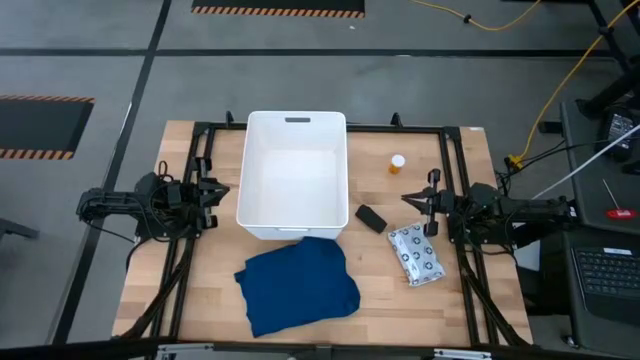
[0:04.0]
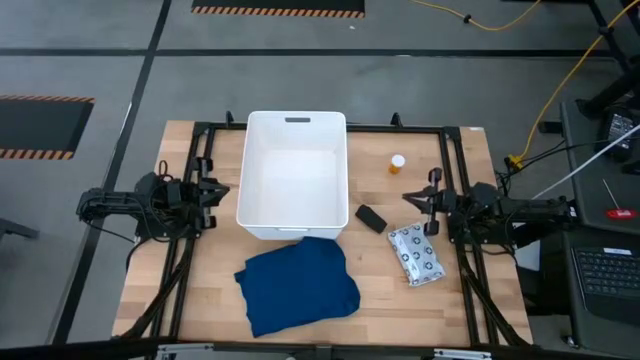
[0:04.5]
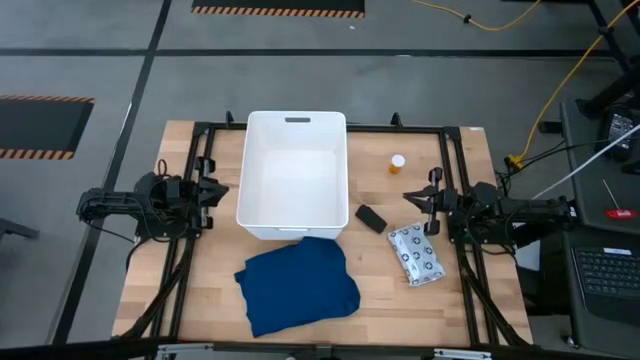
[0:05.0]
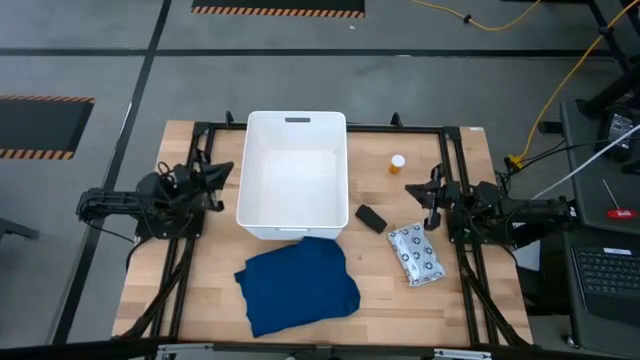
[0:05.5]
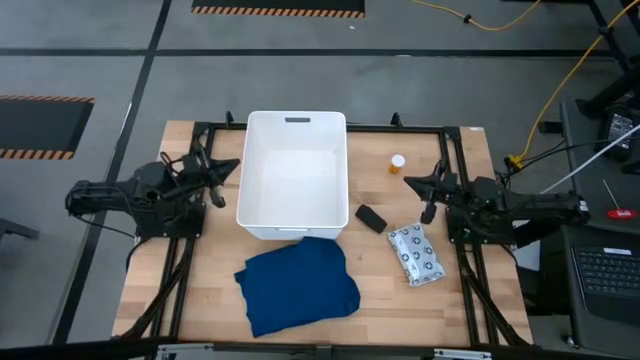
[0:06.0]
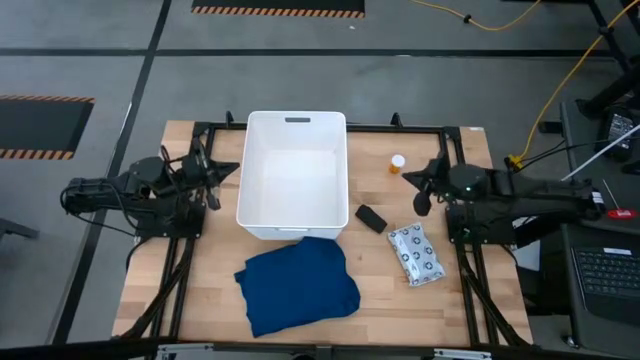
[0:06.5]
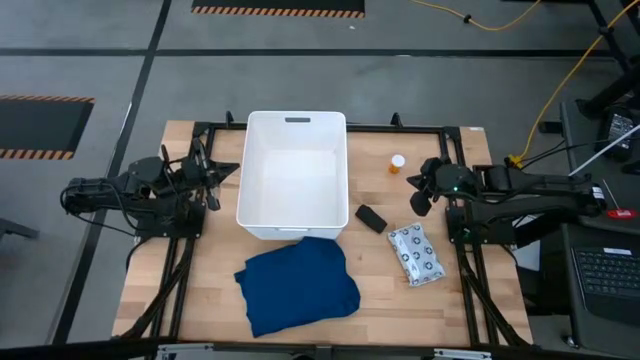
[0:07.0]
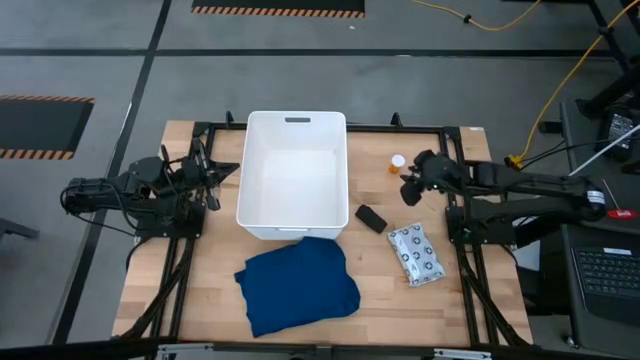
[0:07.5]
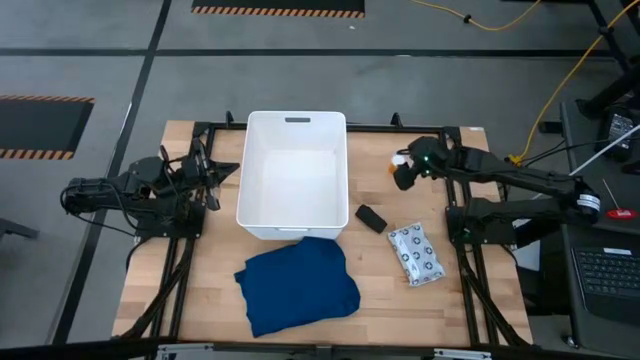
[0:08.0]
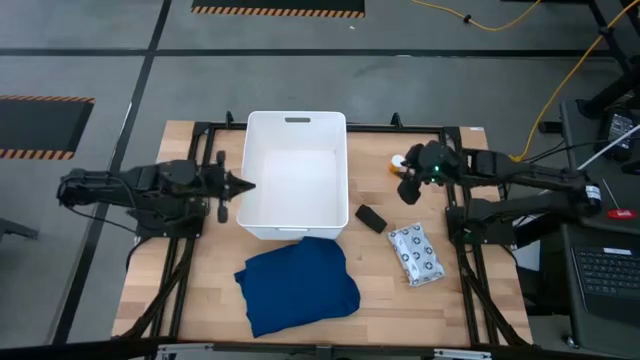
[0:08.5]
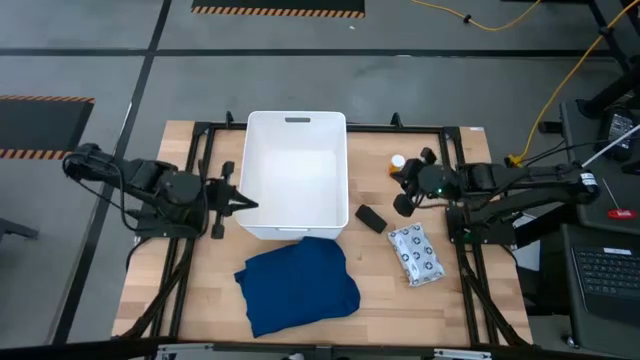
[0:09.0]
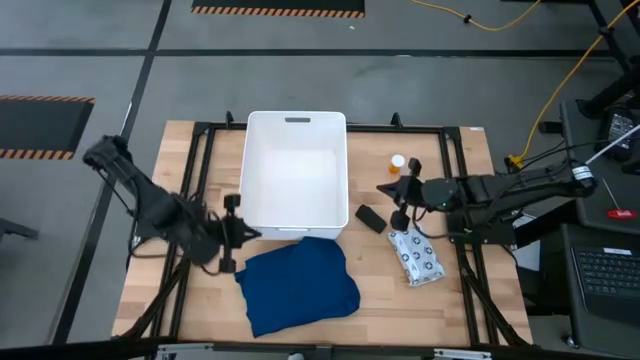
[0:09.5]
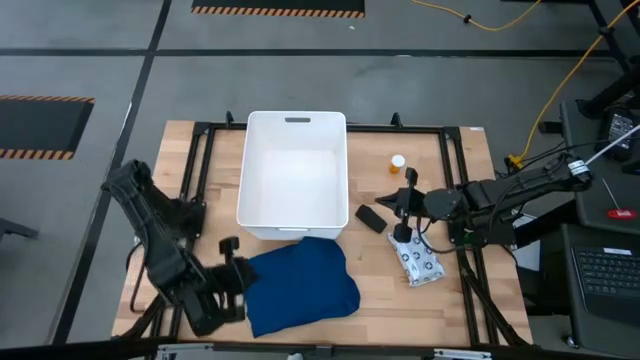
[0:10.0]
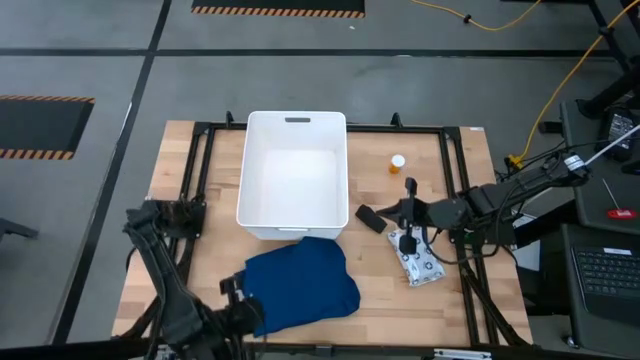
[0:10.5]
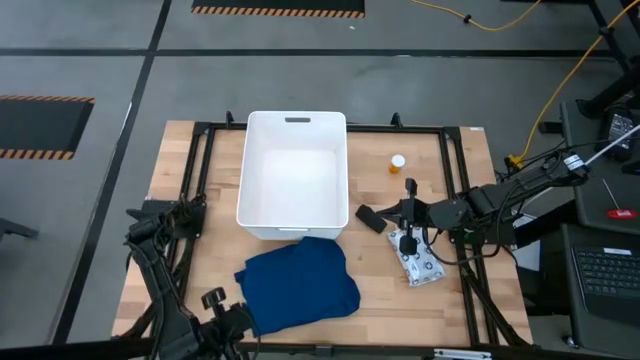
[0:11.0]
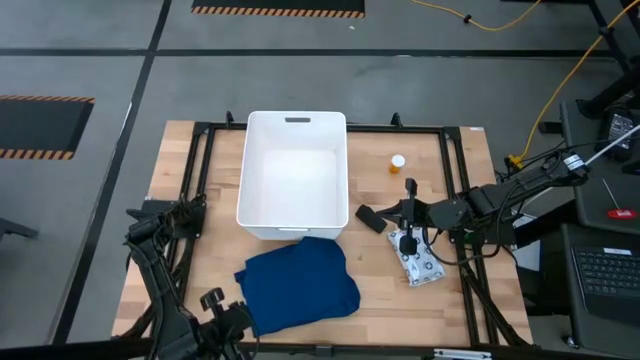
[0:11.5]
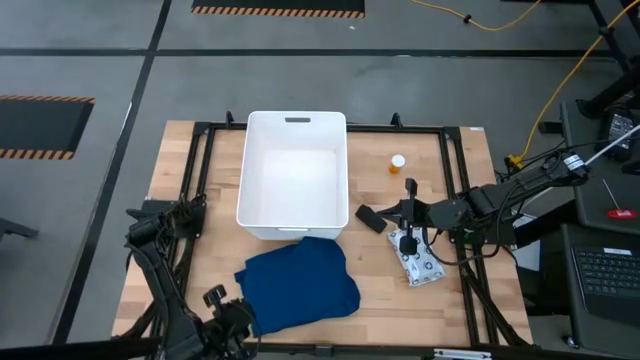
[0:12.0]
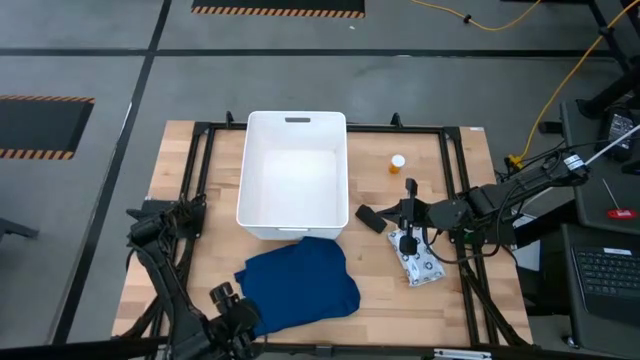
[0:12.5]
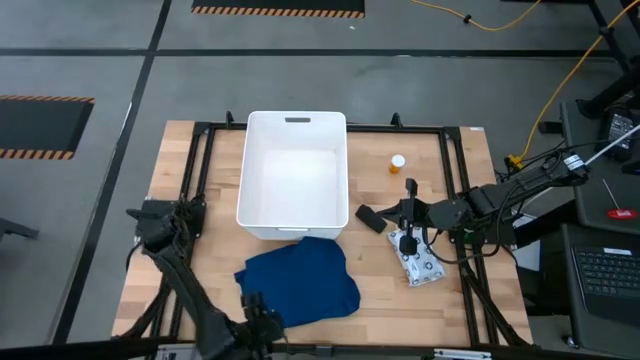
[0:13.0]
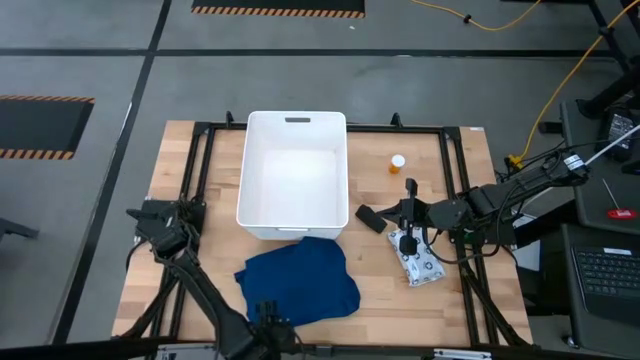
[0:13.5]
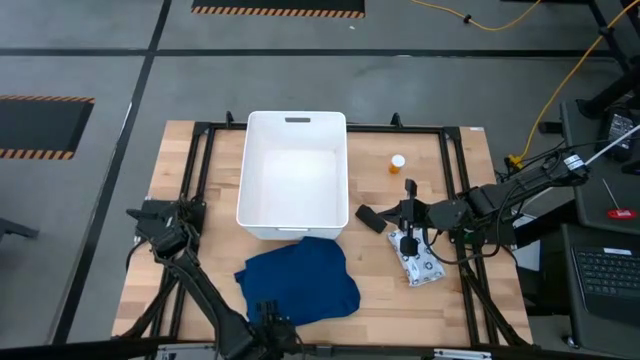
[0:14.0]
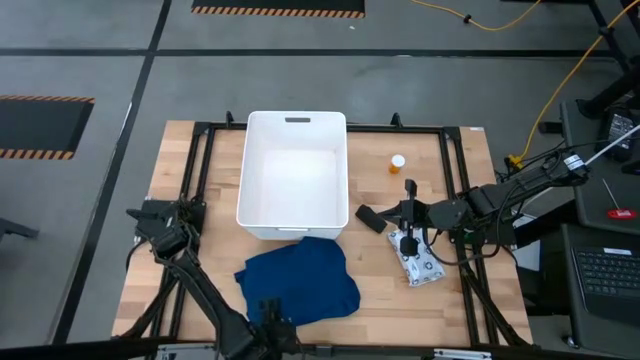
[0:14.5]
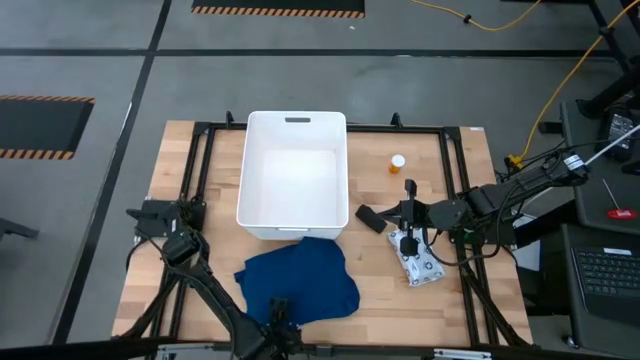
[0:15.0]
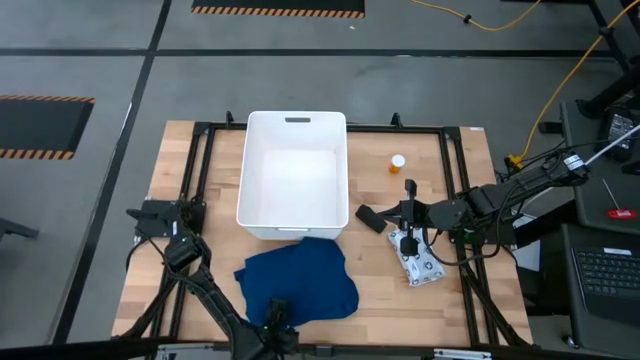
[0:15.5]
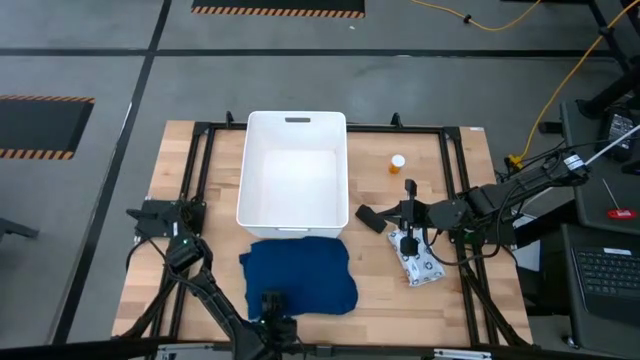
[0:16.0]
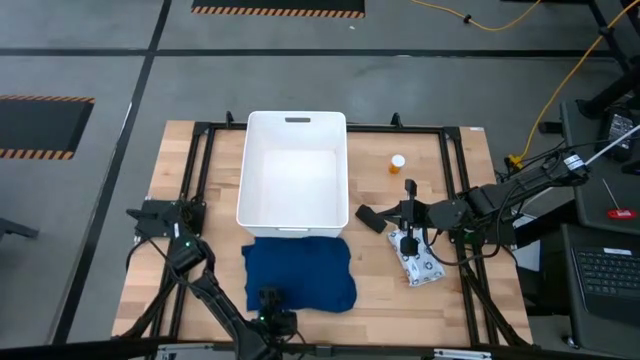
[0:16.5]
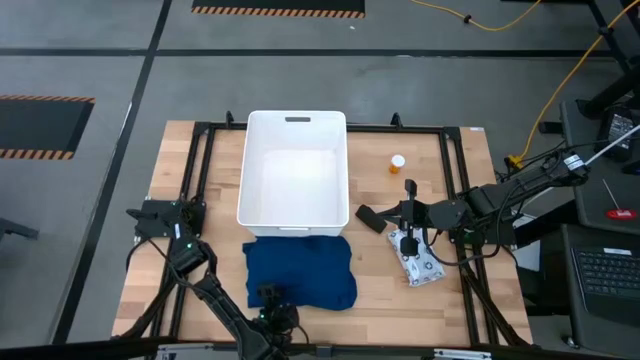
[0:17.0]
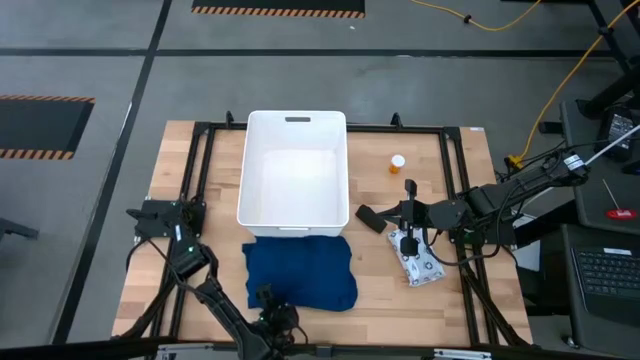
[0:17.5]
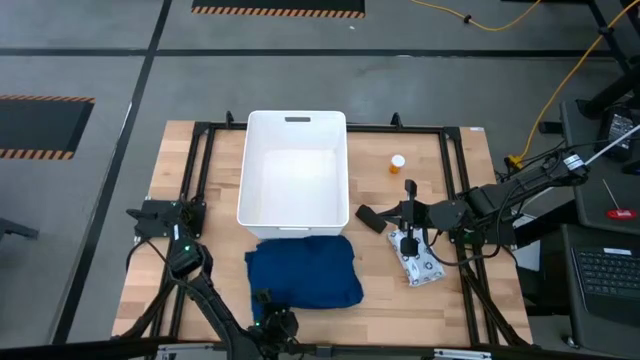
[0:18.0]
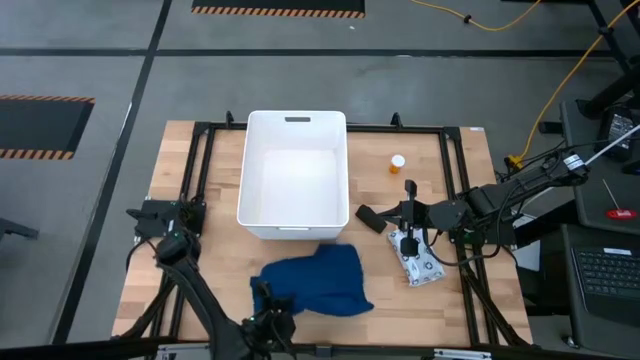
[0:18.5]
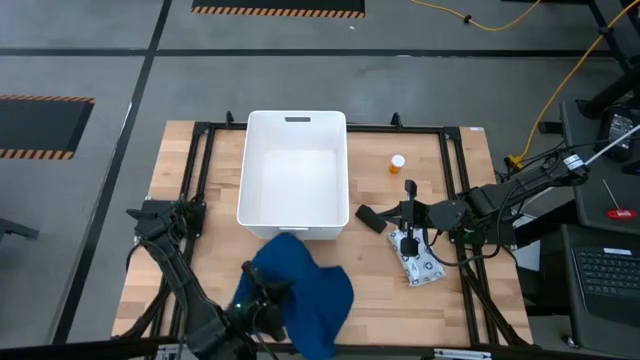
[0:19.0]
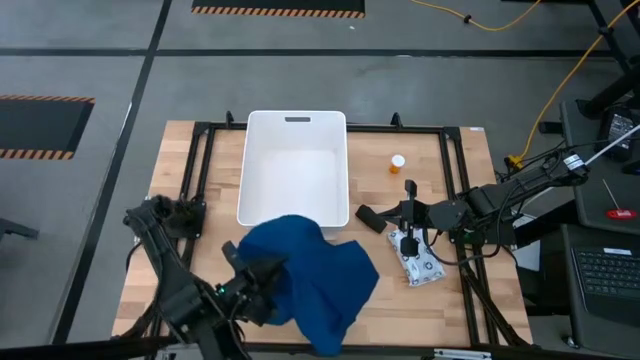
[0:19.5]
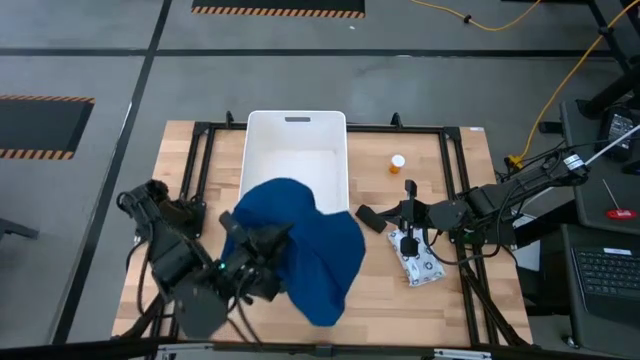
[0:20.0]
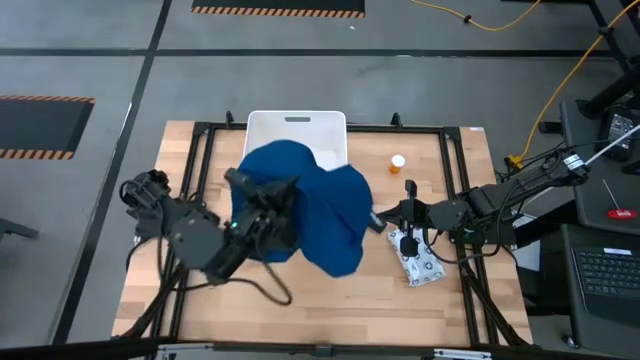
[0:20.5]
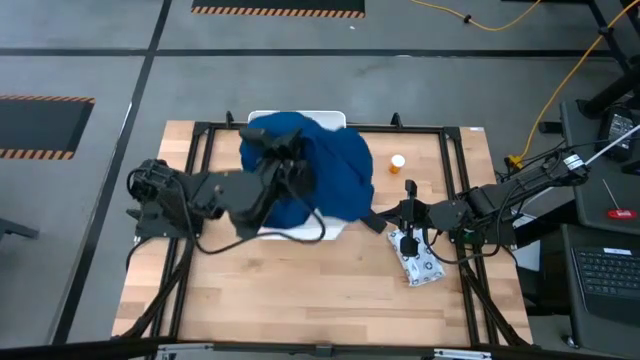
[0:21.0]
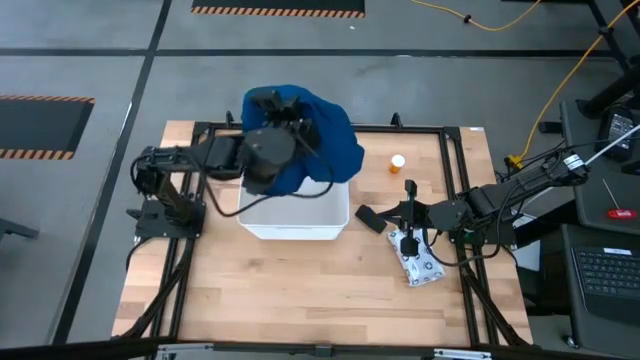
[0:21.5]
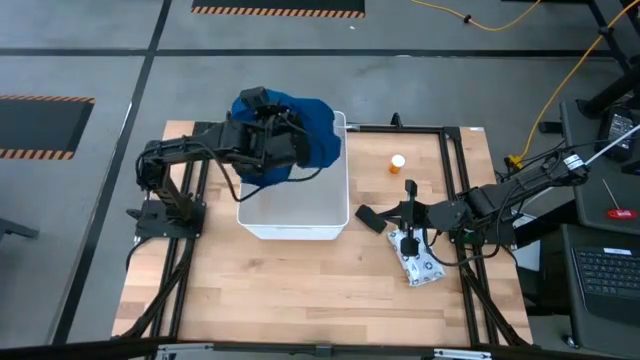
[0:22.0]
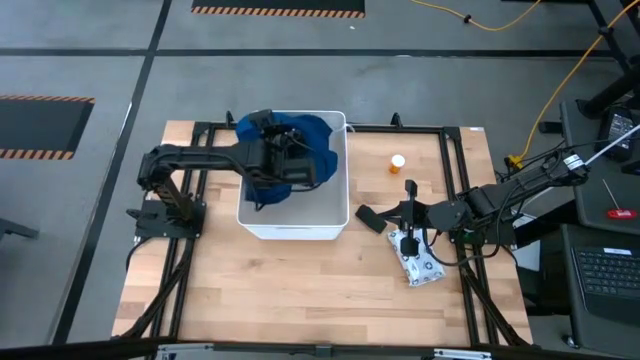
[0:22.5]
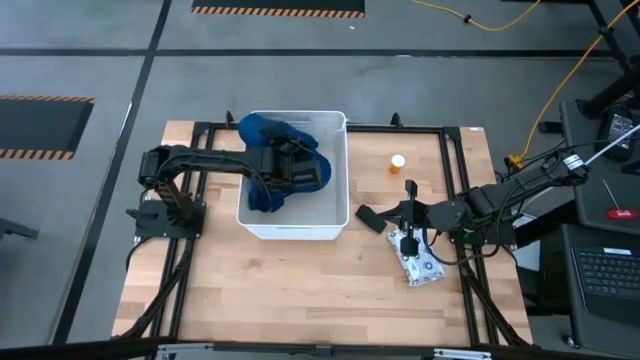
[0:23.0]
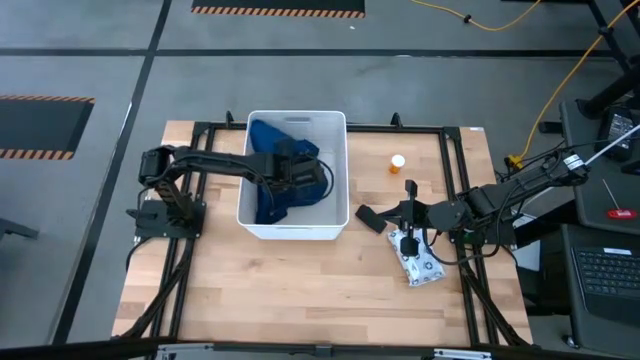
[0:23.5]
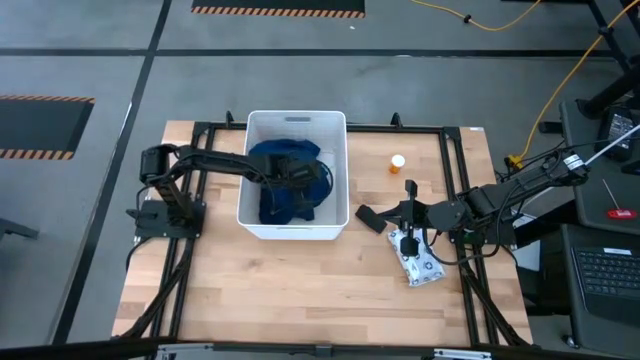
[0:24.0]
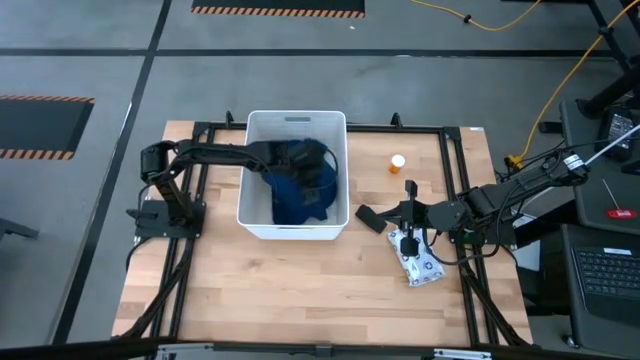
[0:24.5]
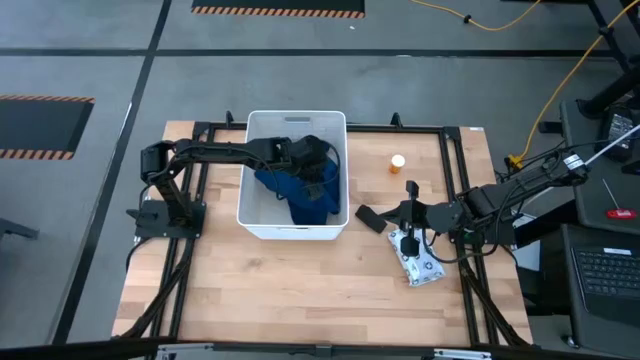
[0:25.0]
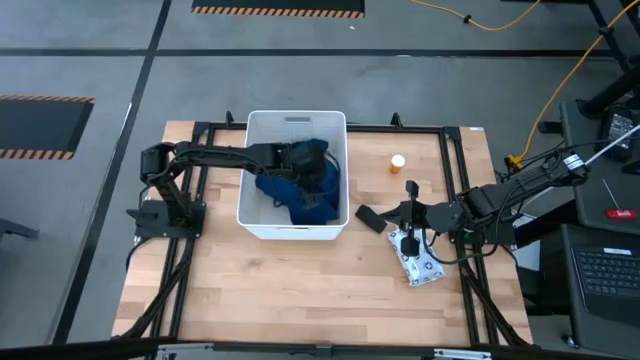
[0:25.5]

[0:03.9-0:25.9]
Task: Pick & place medical supplies in basket/bin
Put the blue gown into the white bin
